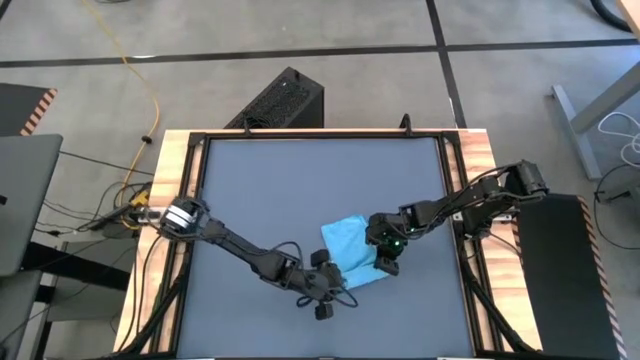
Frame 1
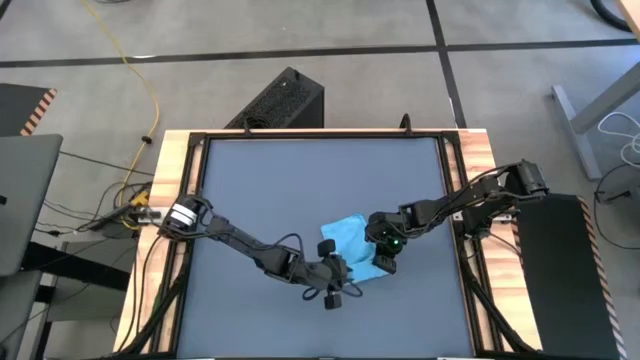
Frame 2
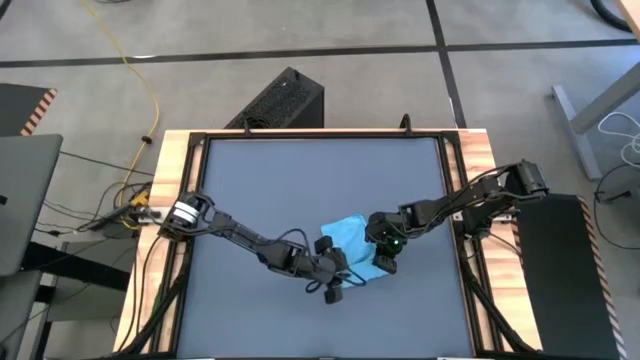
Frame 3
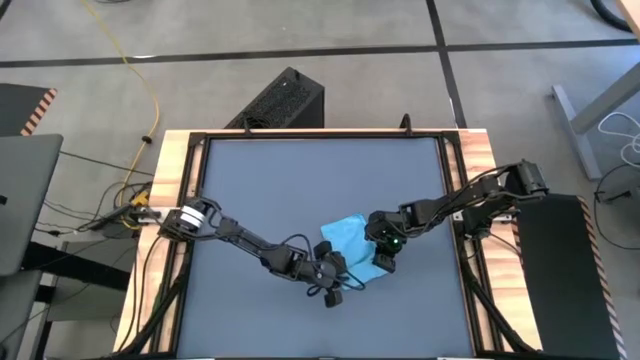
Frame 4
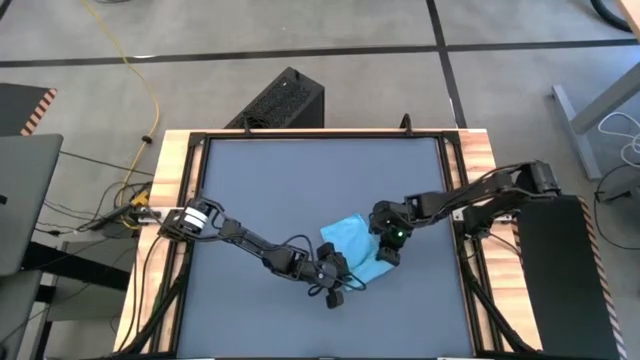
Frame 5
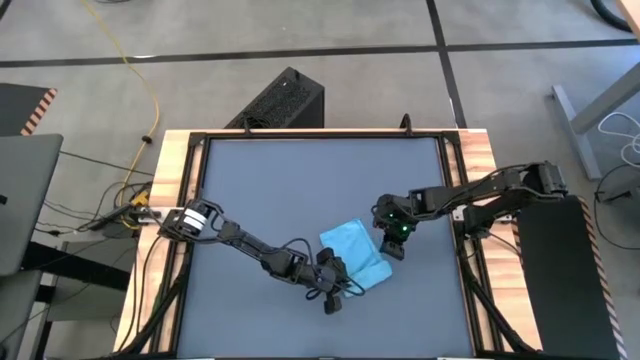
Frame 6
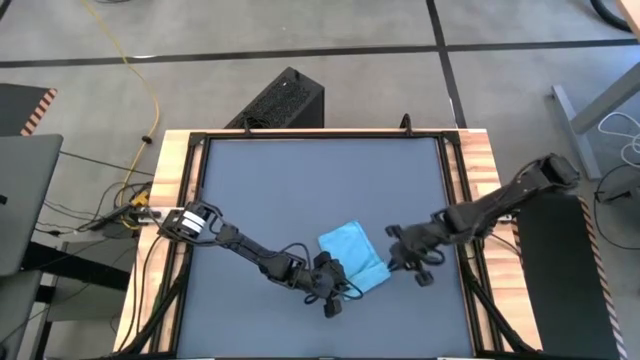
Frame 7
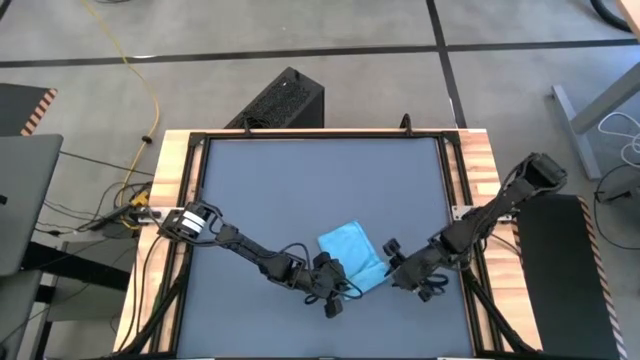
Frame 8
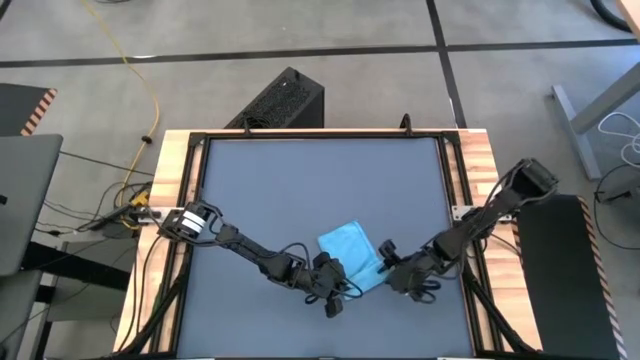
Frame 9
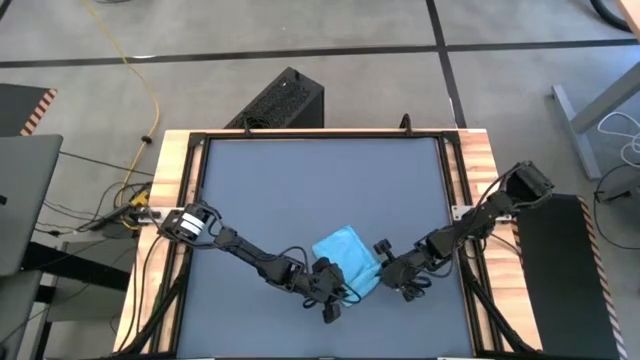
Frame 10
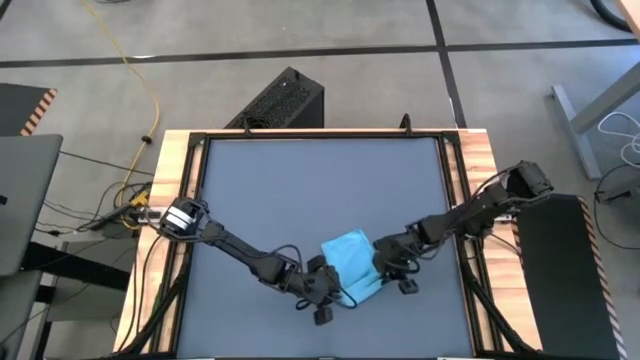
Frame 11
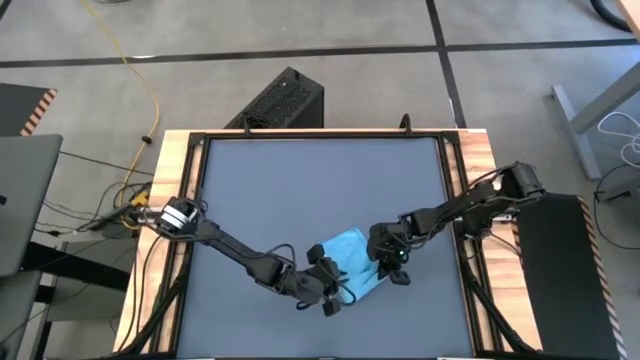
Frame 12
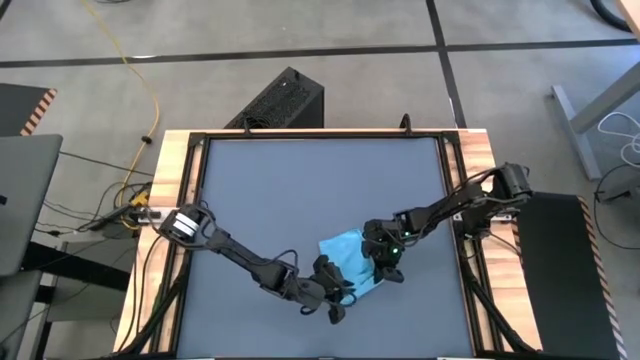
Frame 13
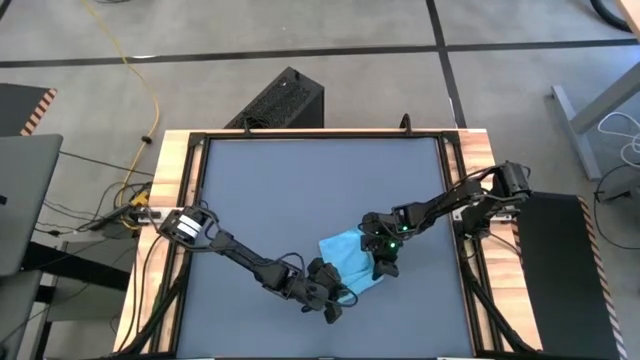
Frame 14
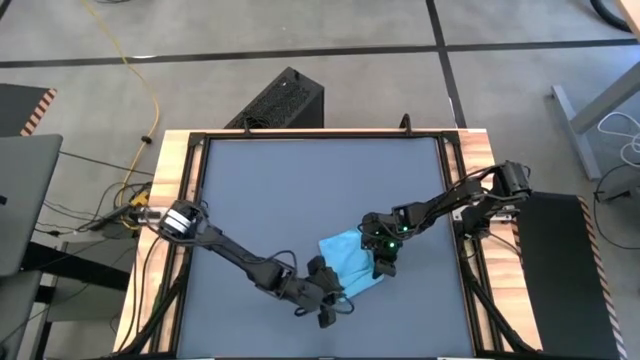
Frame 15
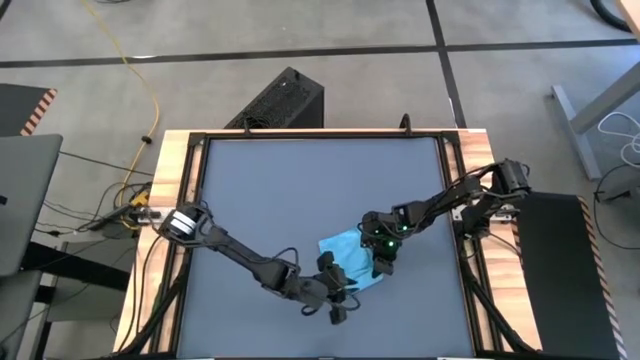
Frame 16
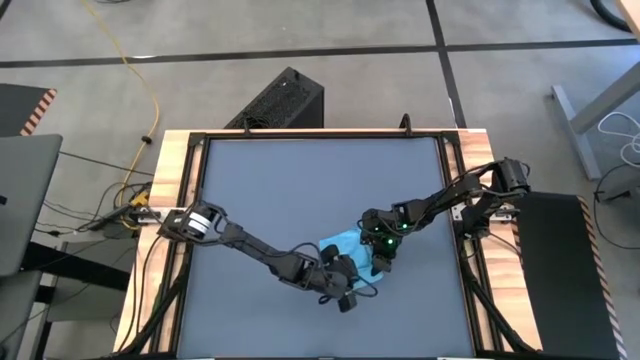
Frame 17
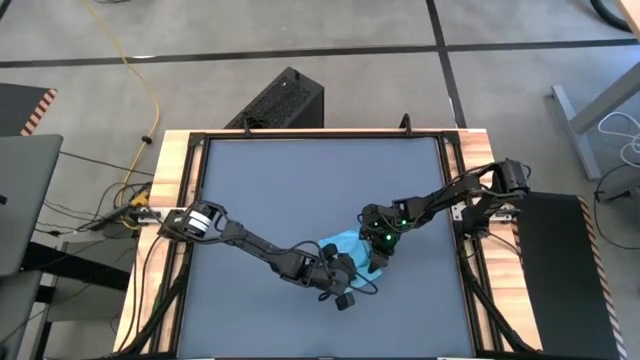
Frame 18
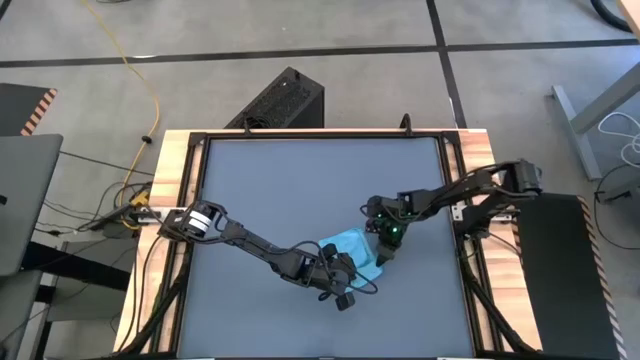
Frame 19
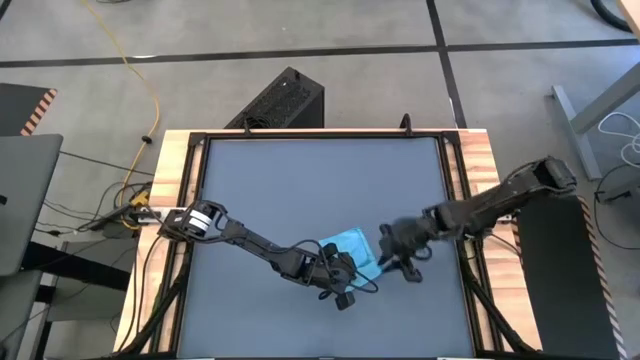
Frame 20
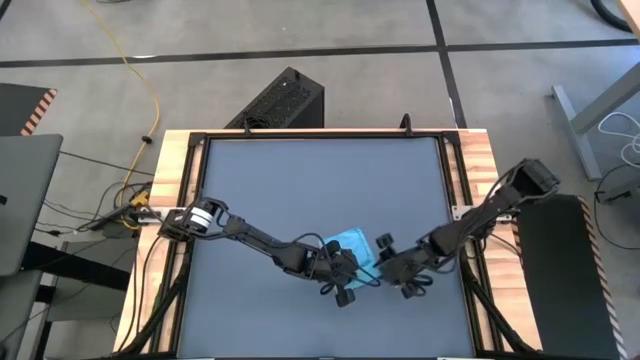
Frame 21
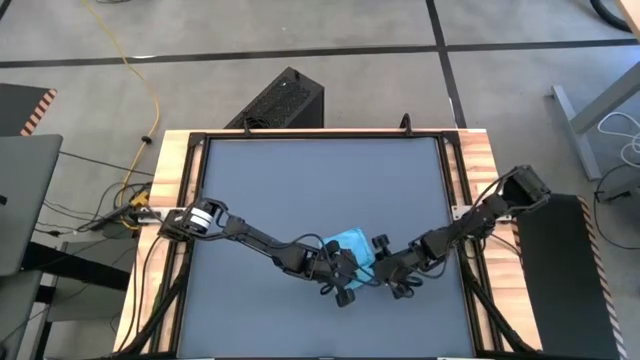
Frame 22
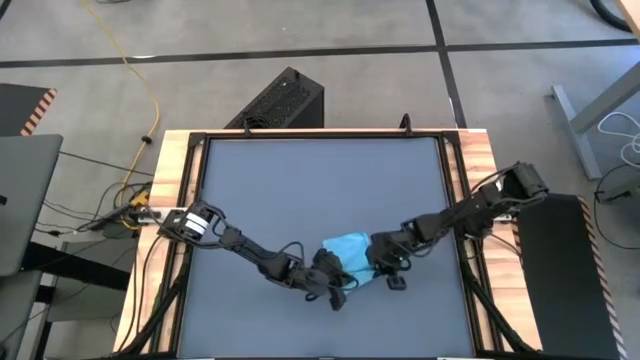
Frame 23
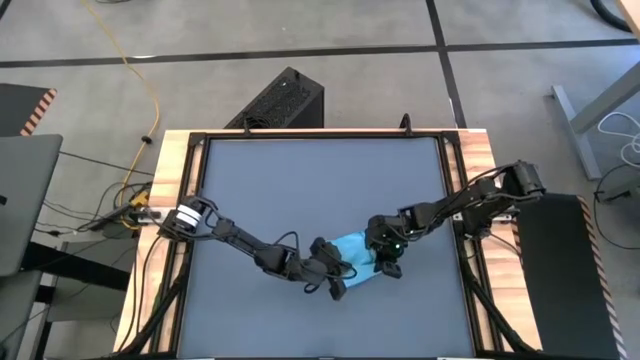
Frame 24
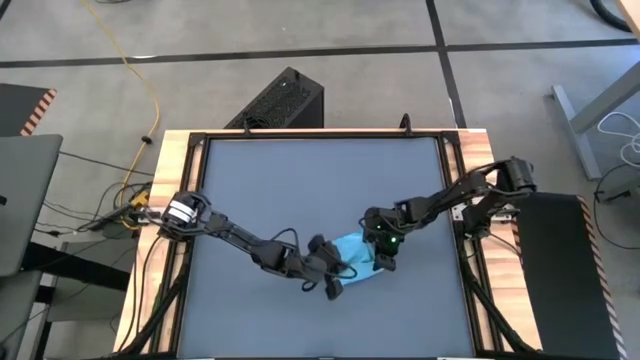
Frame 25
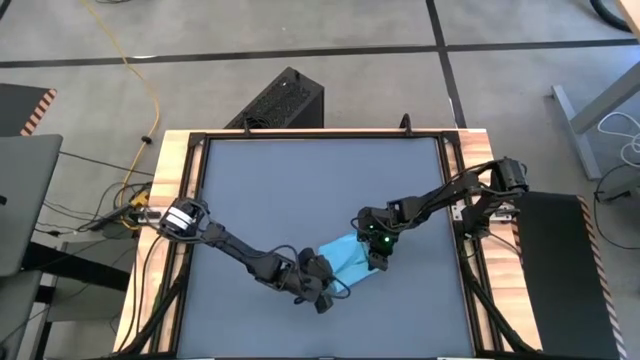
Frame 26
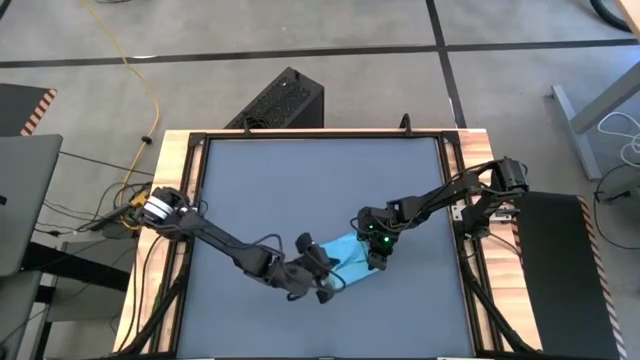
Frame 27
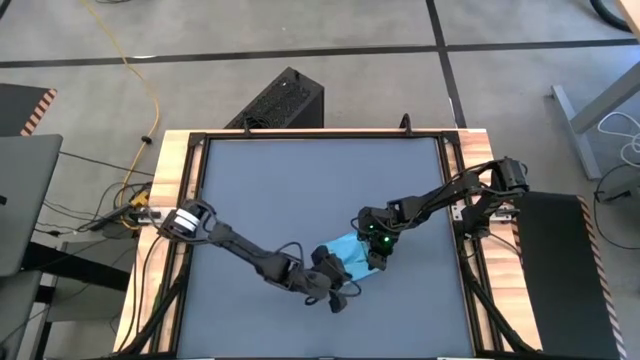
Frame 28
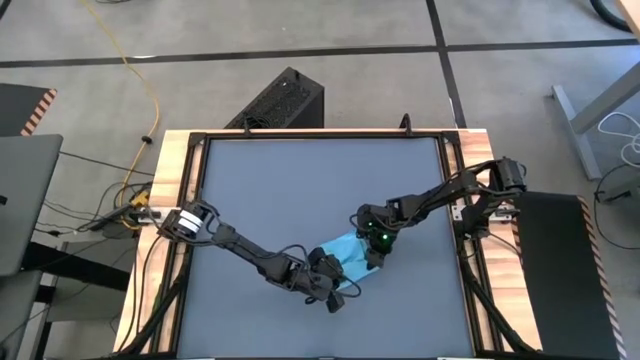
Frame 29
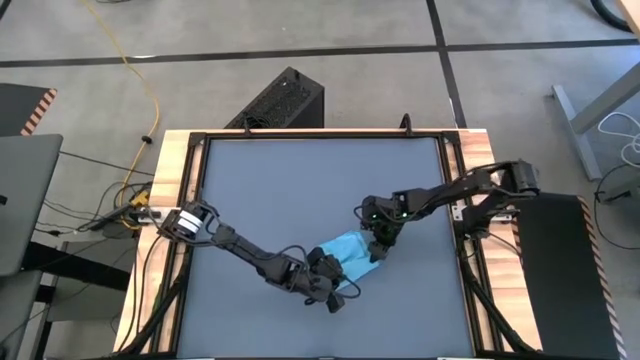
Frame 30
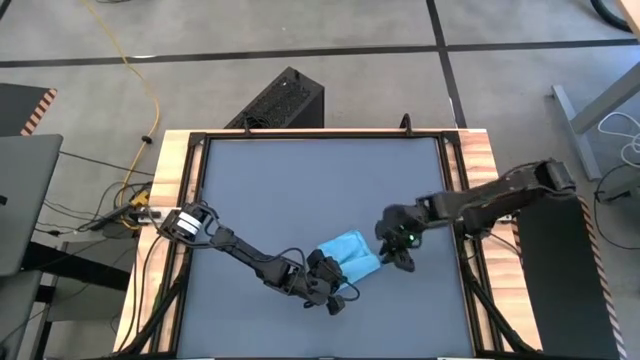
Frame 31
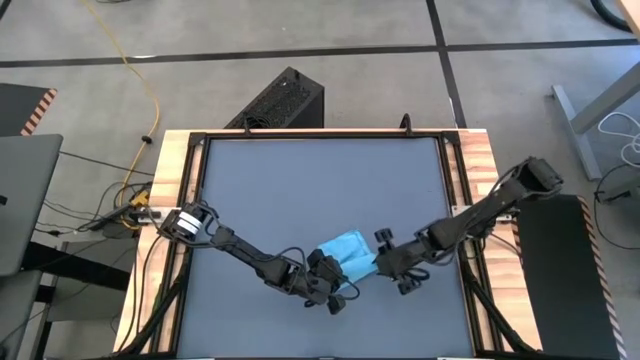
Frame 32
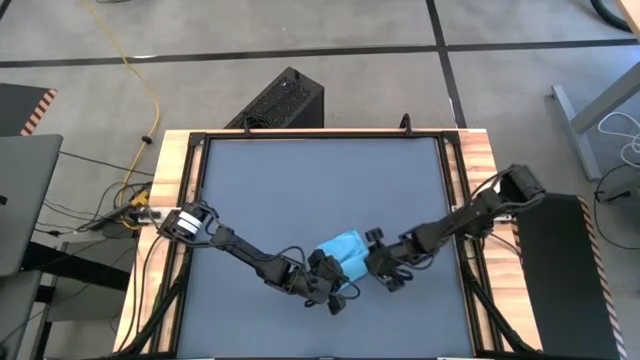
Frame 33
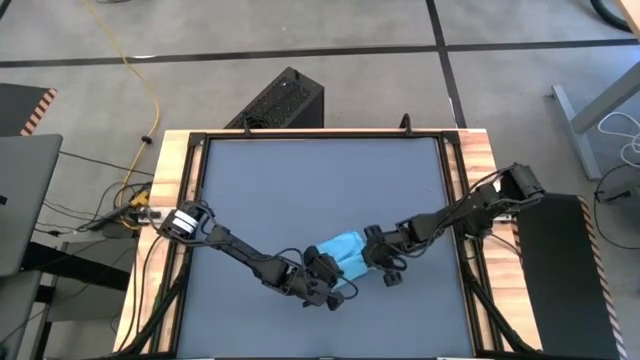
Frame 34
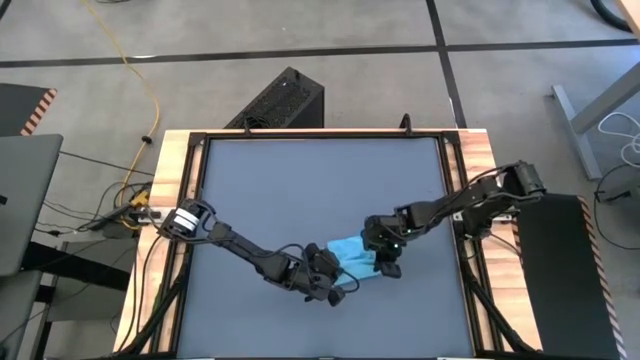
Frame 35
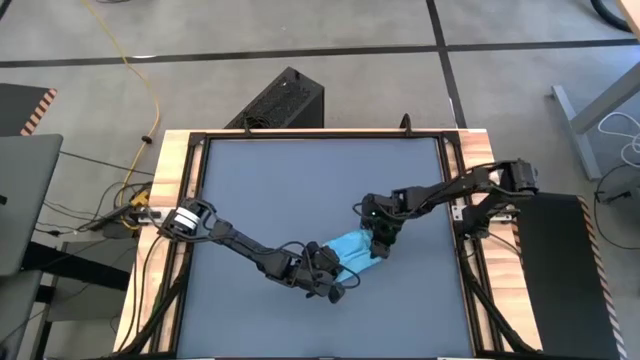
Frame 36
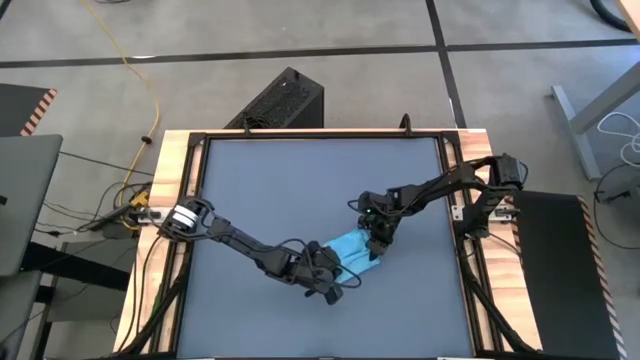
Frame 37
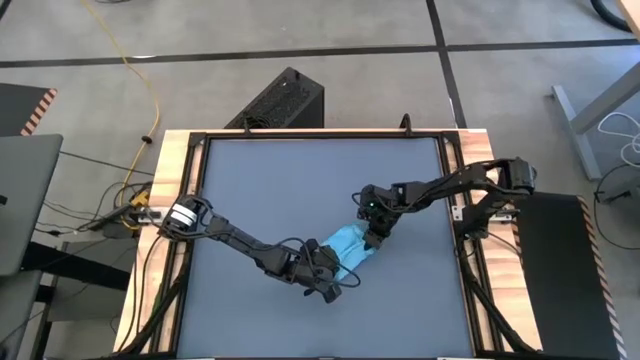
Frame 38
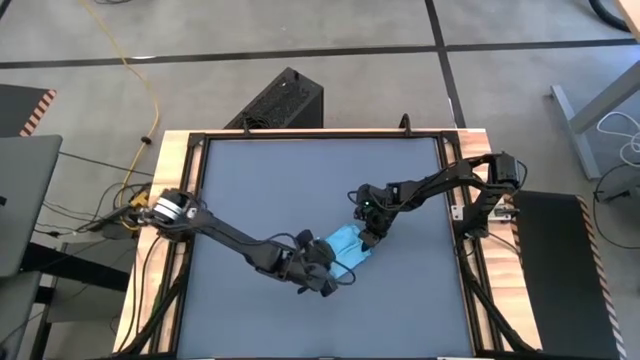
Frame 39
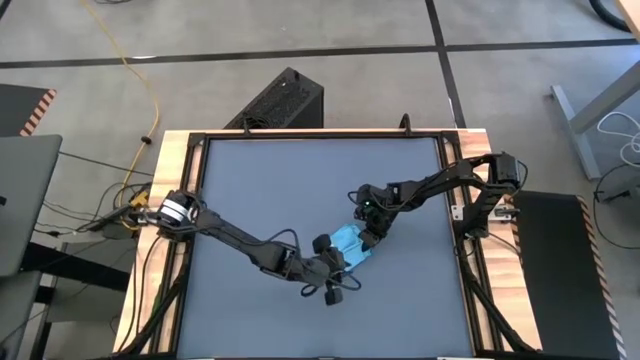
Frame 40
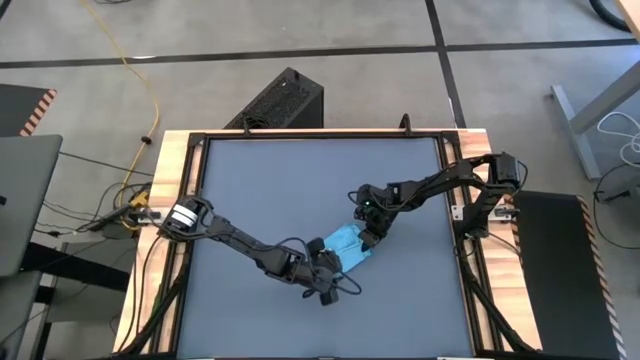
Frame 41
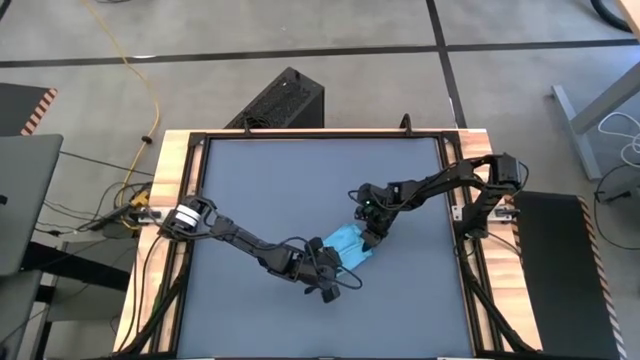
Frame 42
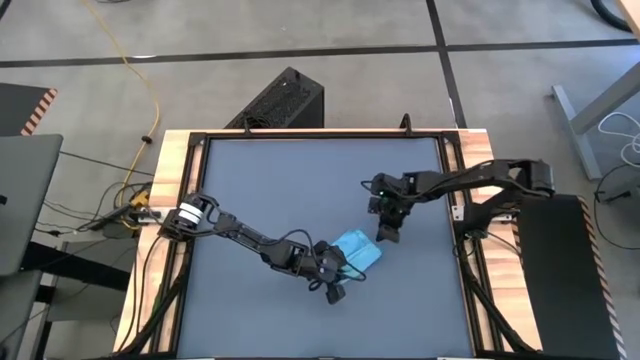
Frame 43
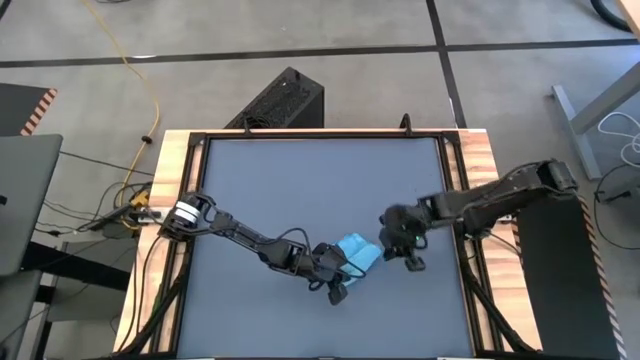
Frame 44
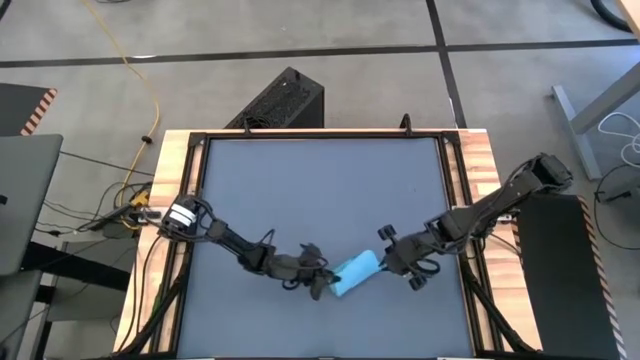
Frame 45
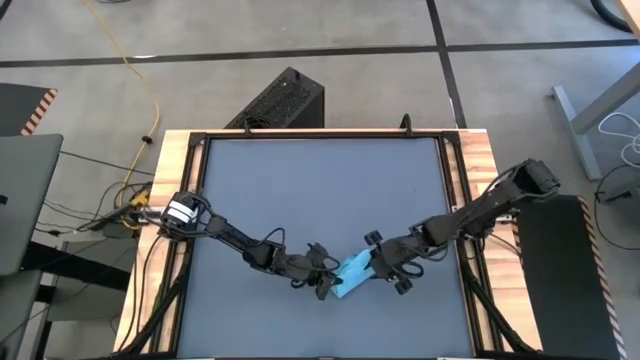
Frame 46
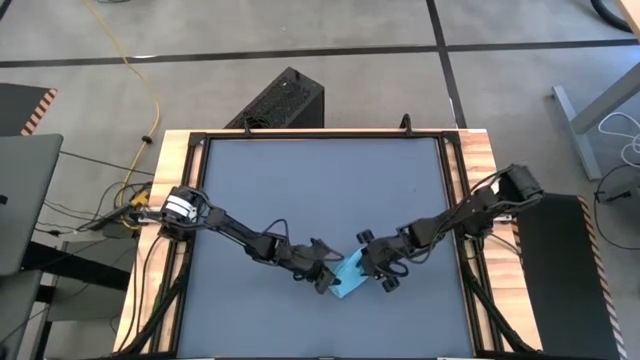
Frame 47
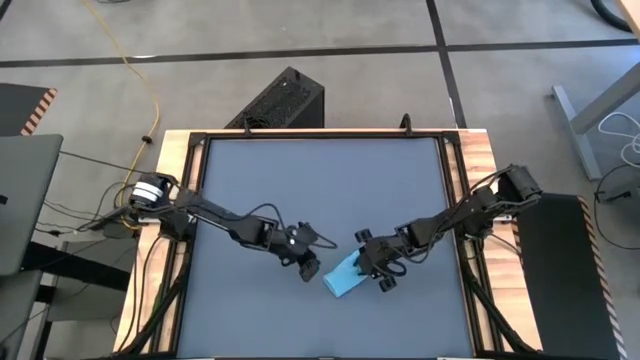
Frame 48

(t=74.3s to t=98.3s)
Task: Roll towel into tight, uniform cylinder
Roll the blue microfiber cloth
